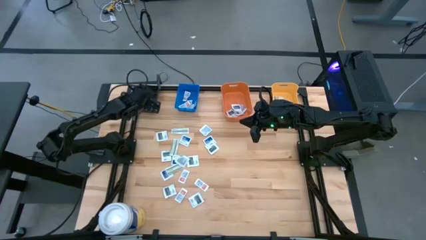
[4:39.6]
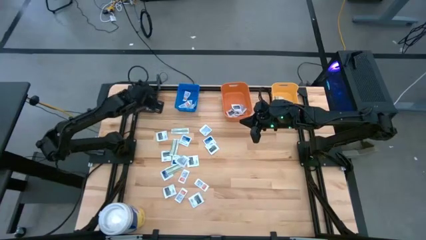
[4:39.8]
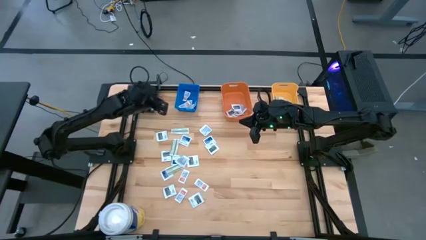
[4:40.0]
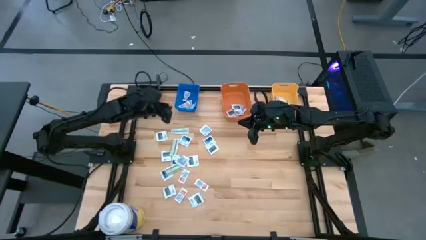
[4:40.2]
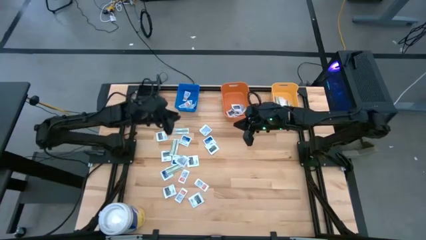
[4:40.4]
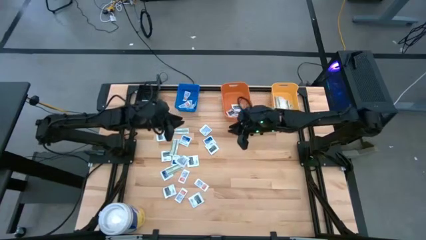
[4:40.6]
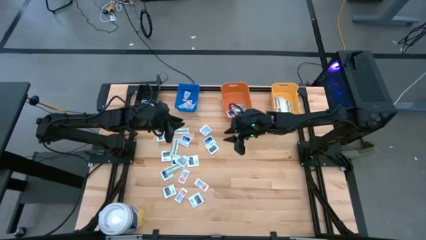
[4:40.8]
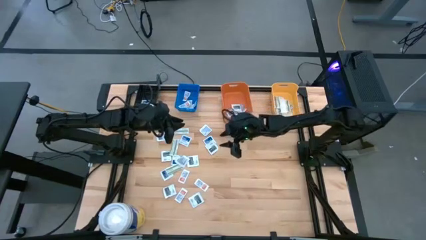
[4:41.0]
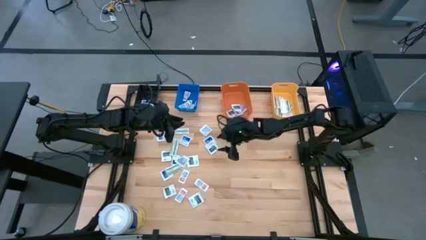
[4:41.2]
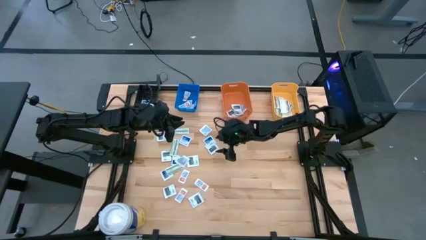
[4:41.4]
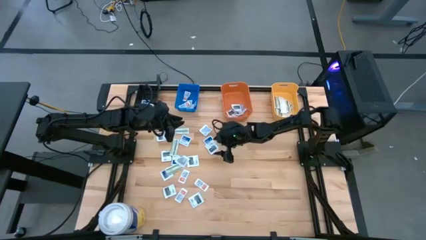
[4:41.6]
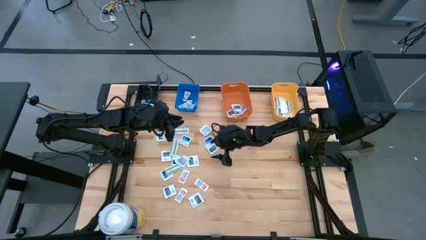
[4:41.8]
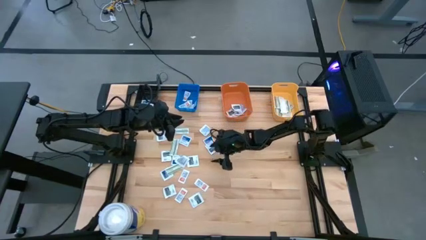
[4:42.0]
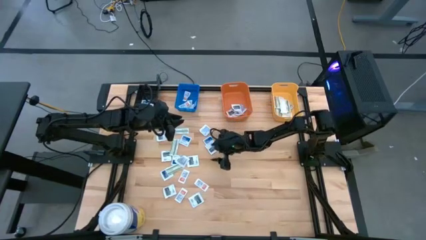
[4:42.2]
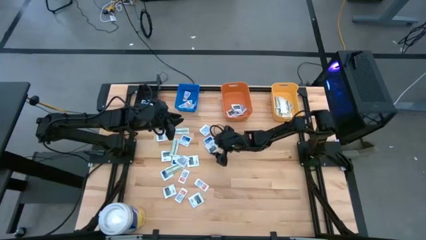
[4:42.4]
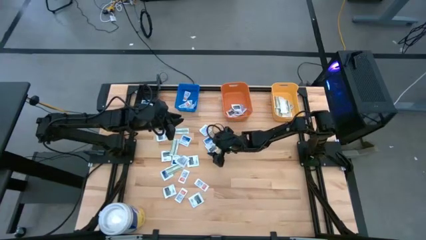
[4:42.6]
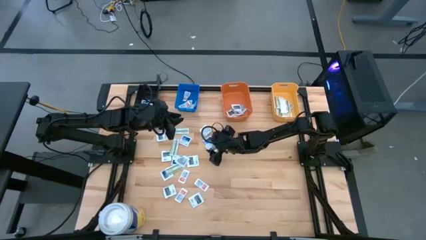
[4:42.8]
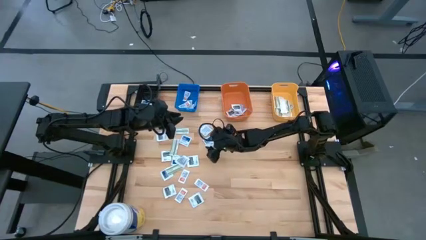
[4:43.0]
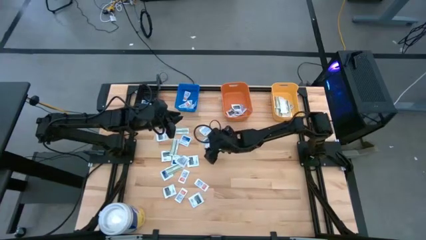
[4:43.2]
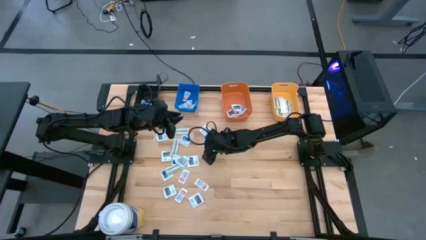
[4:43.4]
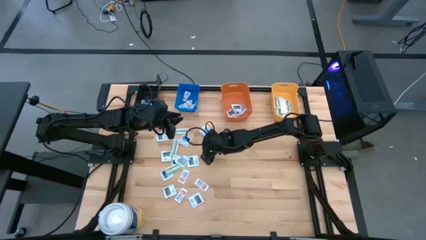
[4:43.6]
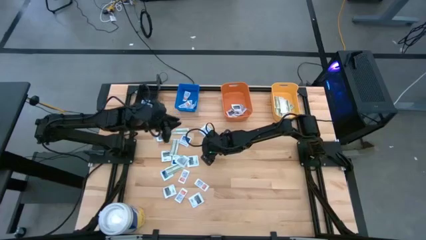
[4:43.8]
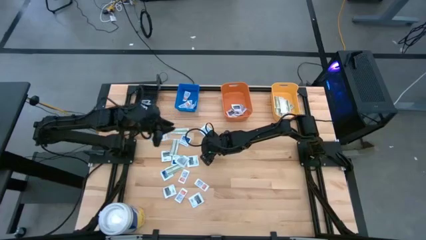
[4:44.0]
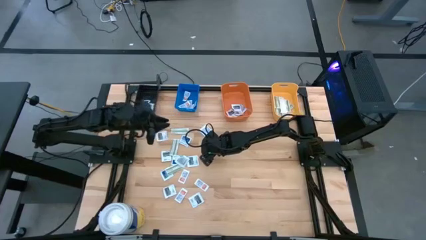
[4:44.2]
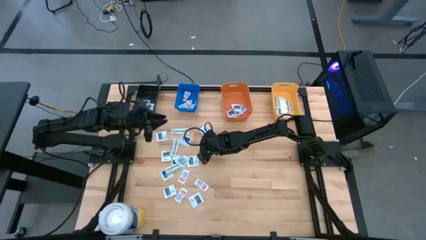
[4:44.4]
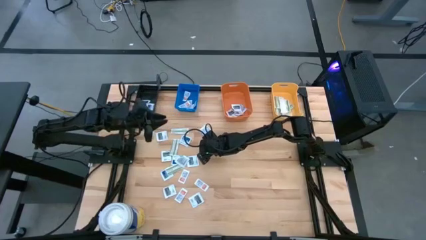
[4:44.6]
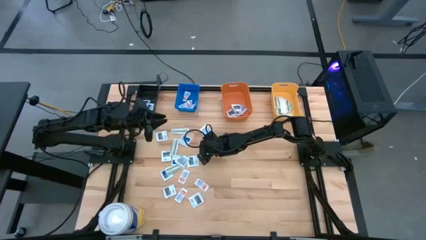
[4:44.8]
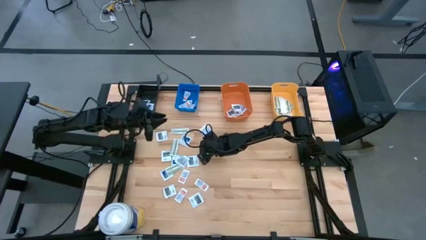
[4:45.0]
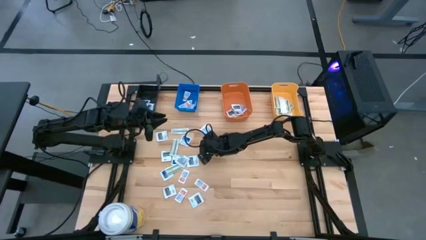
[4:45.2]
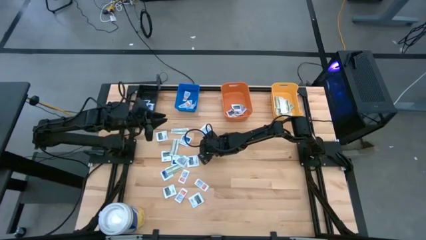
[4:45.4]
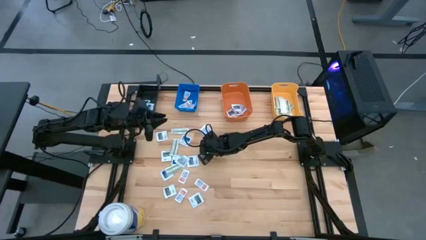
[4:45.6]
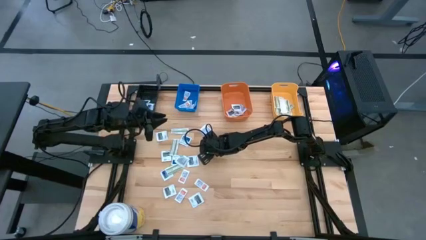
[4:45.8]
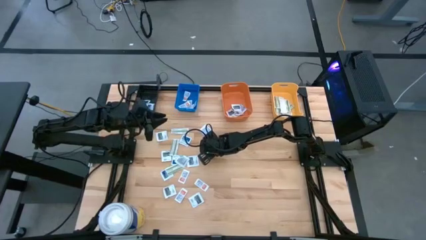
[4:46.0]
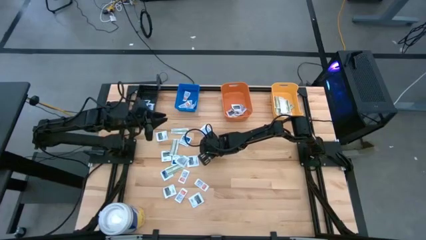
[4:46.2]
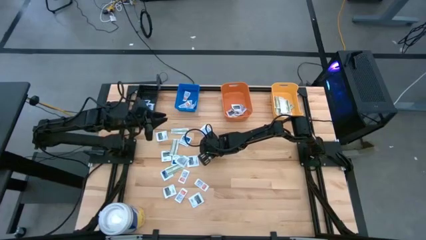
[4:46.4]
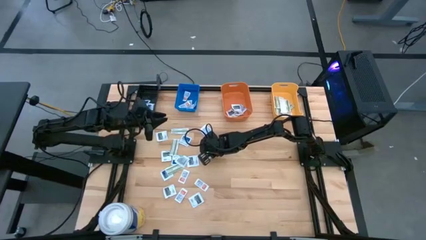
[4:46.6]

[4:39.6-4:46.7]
Task: Pick & Place First Aid Supplies
Put the towelette pack into the orange bin

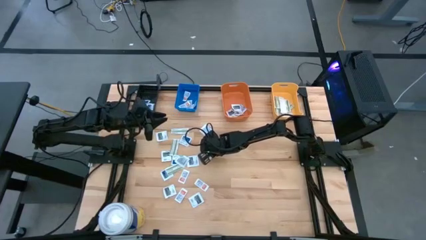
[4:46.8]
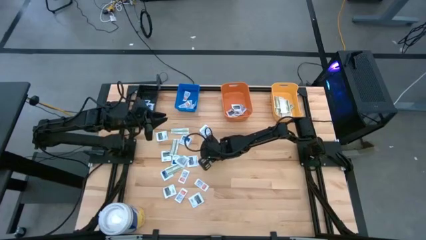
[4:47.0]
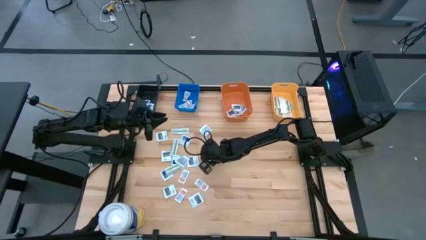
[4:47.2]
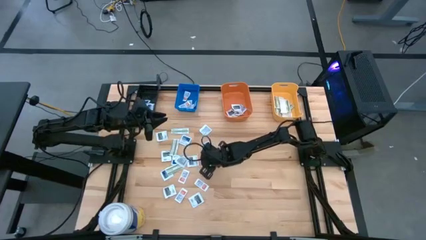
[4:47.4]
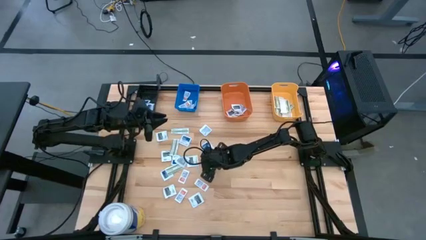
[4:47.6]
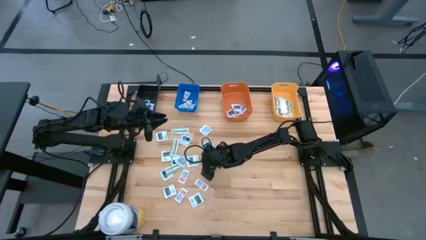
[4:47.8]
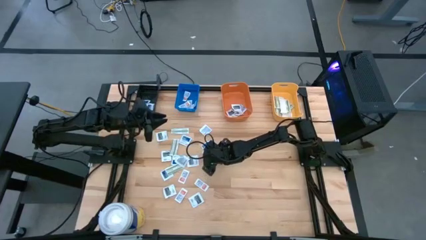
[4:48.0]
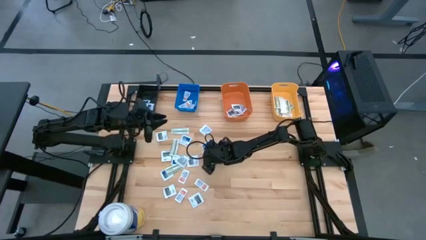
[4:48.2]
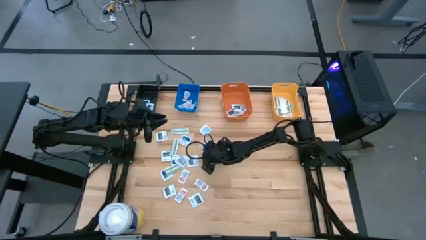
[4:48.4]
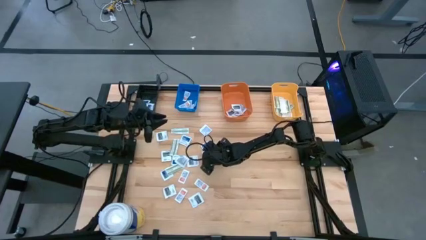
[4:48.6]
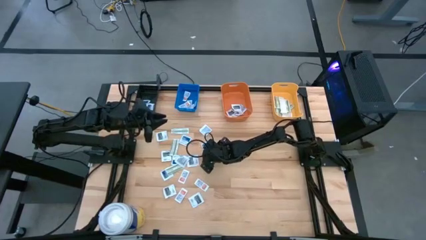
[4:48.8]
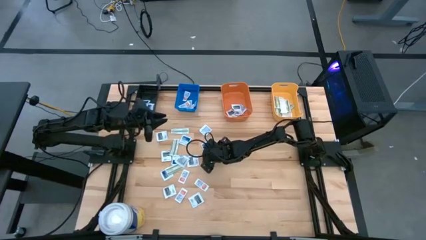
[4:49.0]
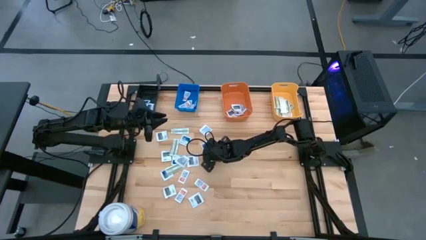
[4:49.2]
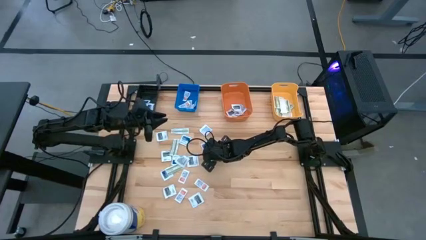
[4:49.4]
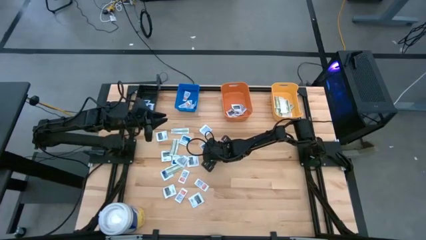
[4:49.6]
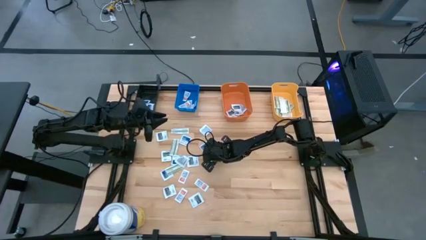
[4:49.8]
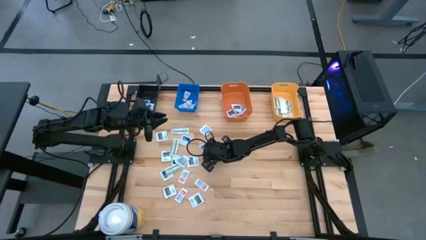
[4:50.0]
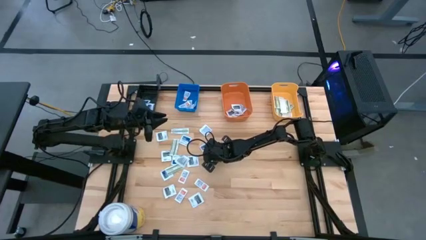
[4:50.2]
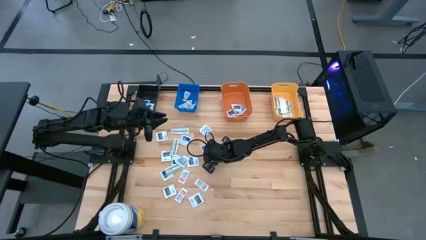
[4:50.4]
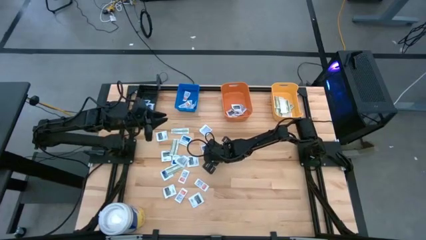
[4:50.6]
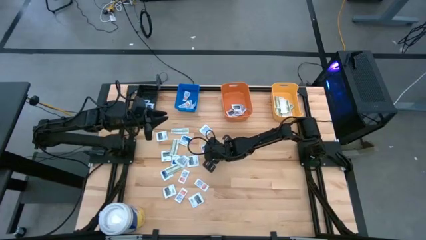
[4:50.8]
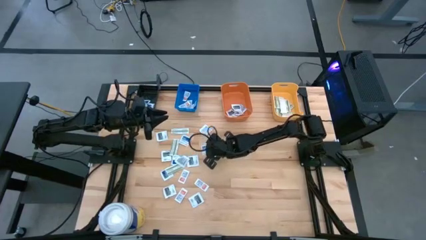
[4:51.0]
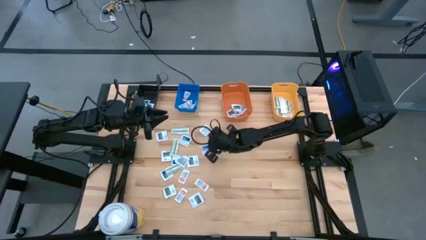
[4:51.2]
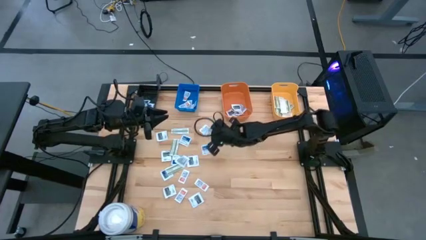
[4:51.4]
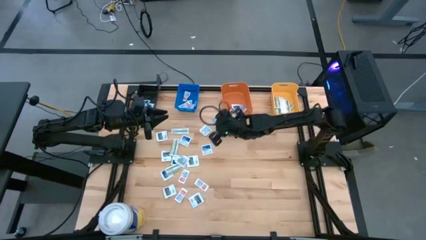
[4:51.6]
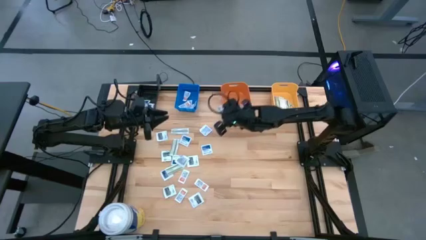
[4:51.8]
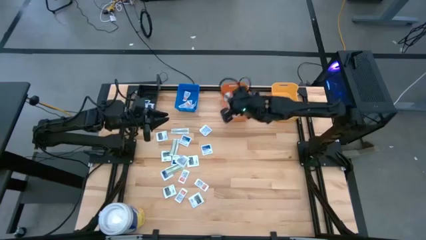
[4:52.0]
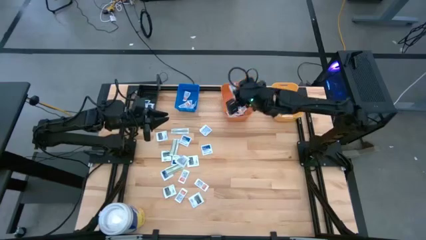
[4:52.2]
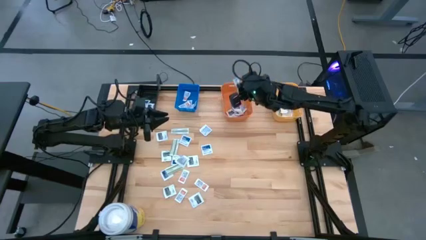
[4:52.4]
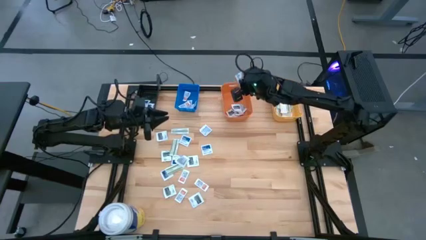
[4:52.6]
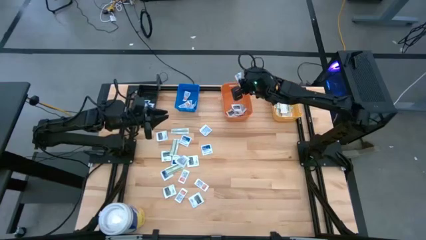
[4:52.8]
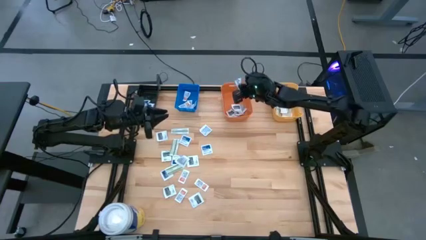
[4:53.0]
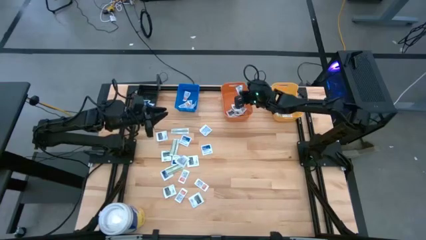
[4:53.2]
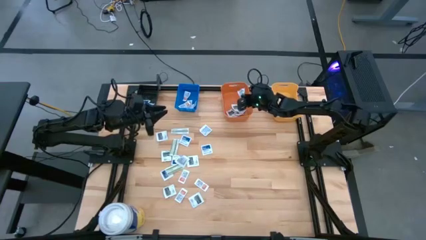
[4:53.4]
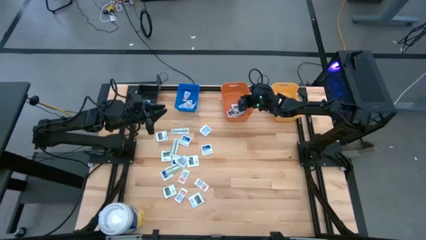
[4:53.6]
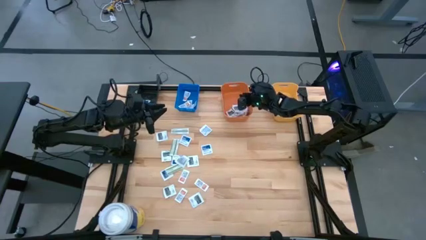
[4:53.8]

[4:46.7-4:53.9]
Put the towelette pack into the orange bin
